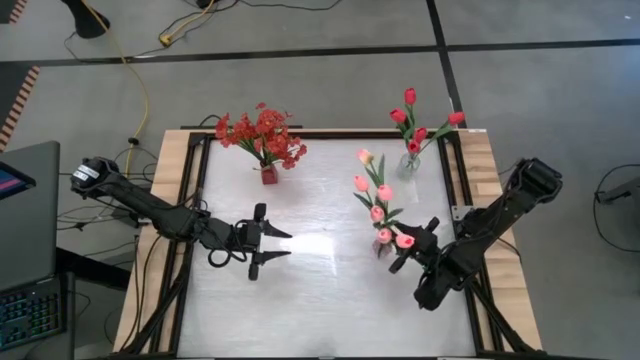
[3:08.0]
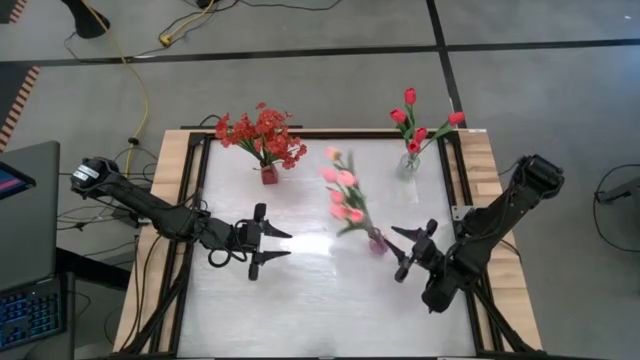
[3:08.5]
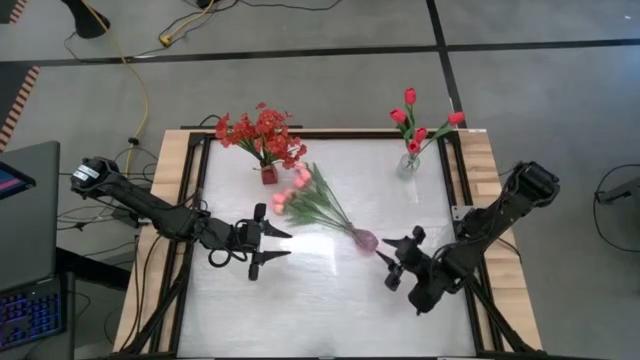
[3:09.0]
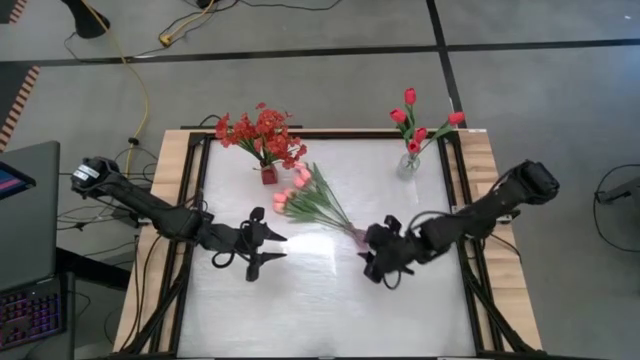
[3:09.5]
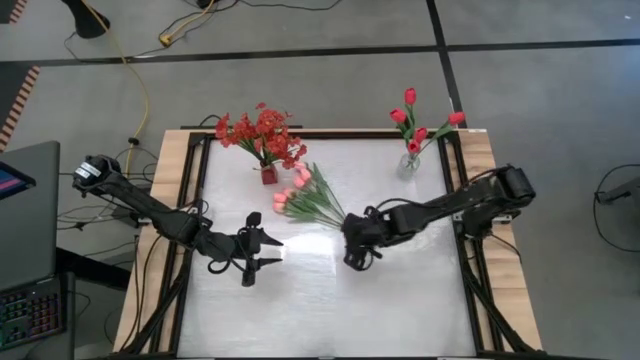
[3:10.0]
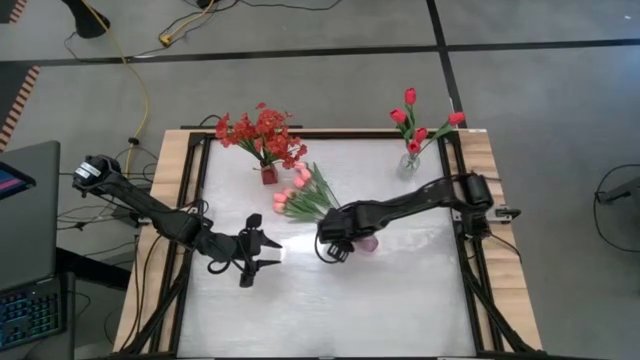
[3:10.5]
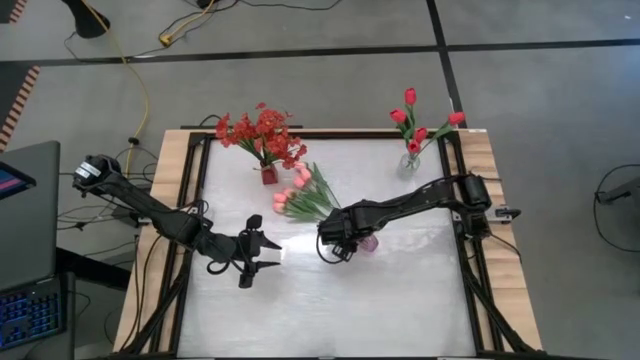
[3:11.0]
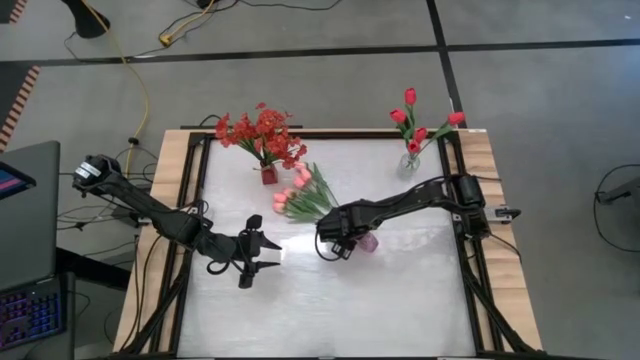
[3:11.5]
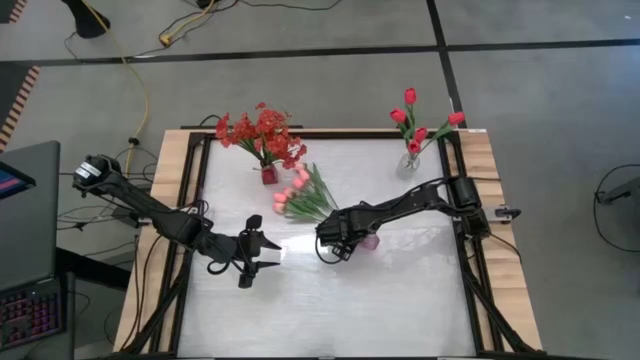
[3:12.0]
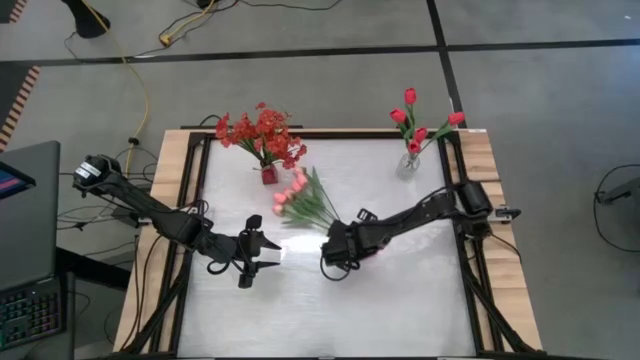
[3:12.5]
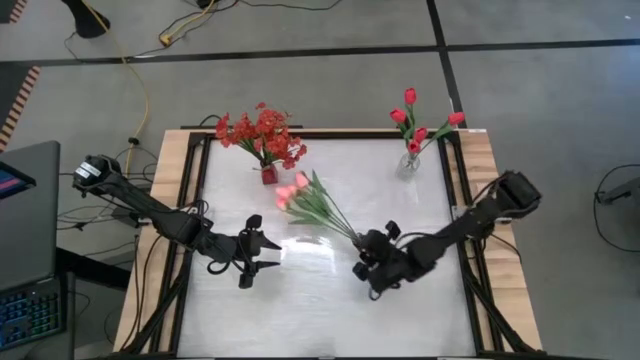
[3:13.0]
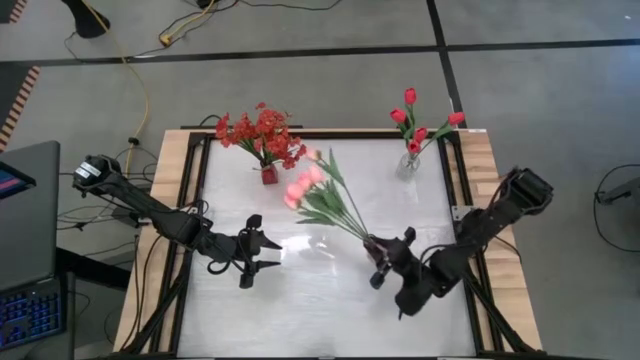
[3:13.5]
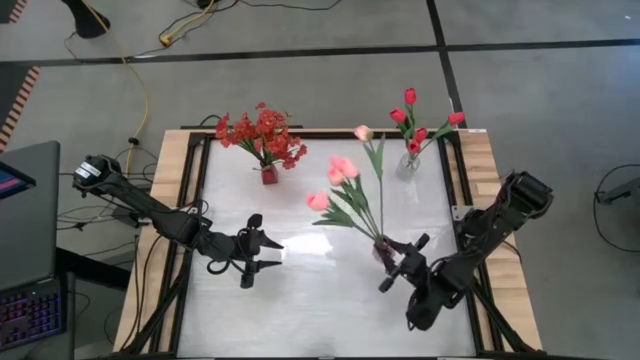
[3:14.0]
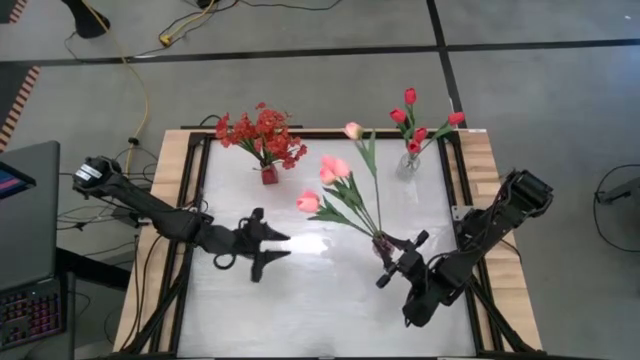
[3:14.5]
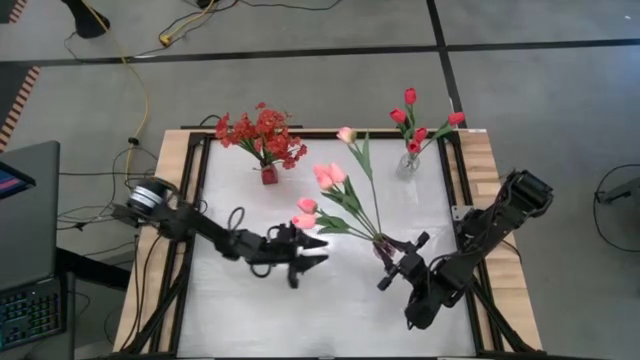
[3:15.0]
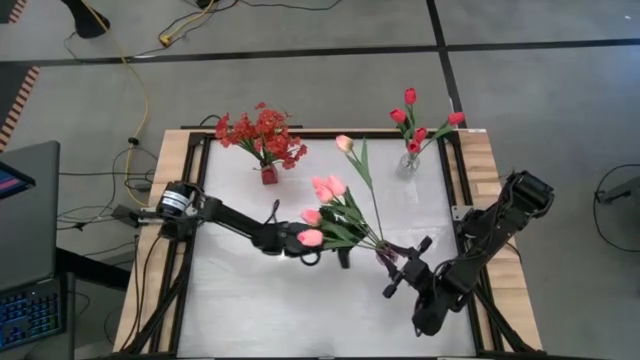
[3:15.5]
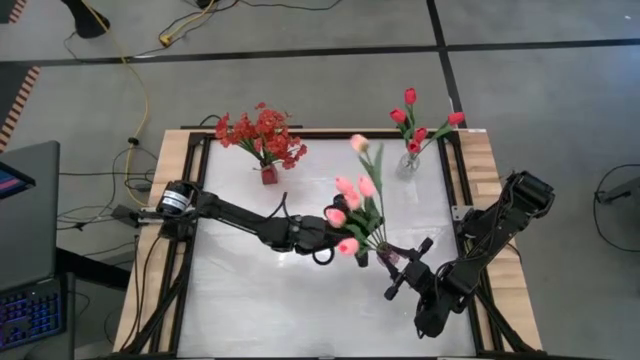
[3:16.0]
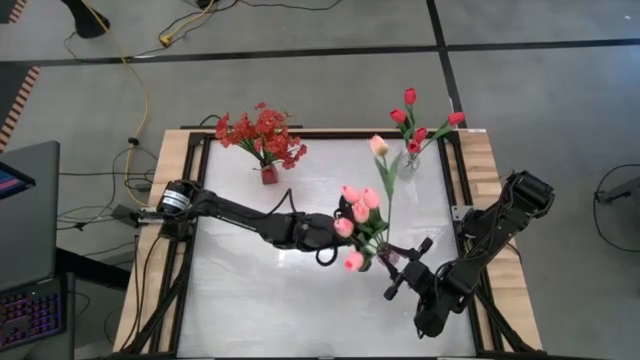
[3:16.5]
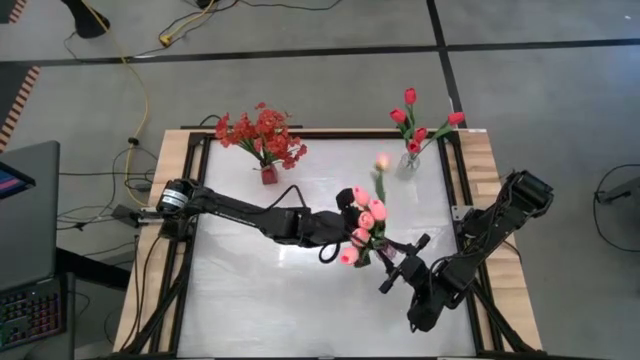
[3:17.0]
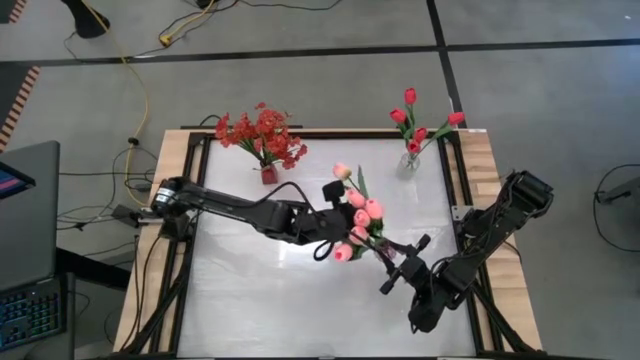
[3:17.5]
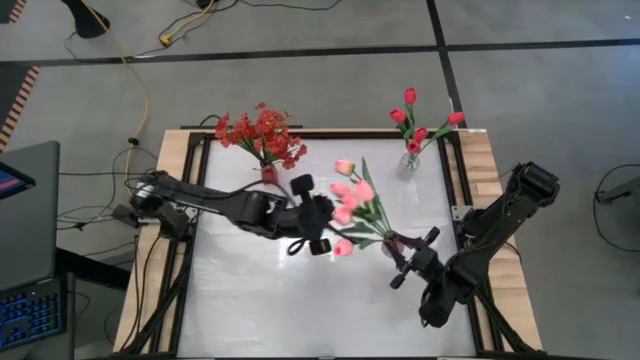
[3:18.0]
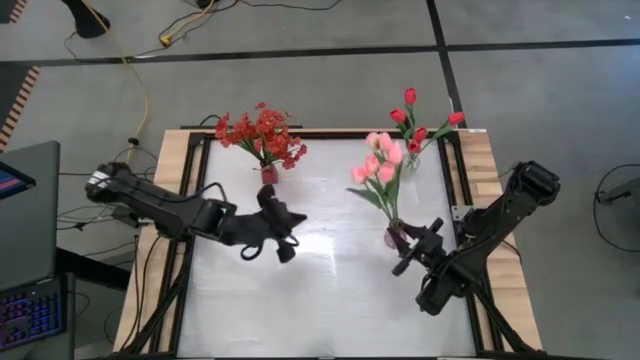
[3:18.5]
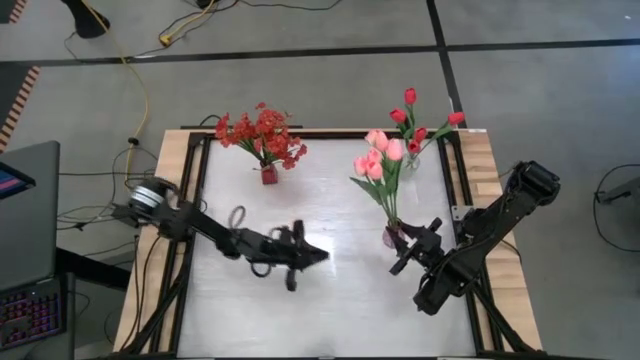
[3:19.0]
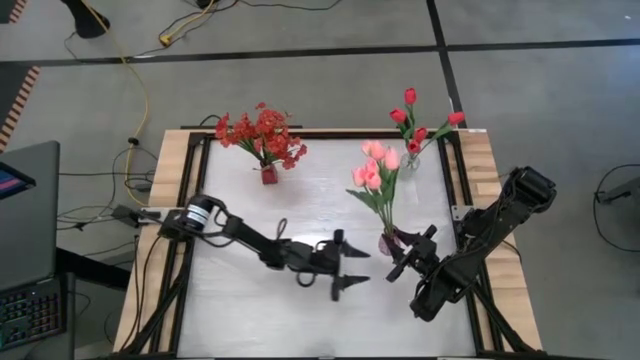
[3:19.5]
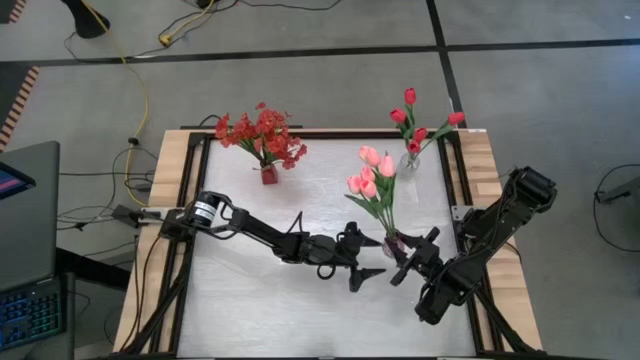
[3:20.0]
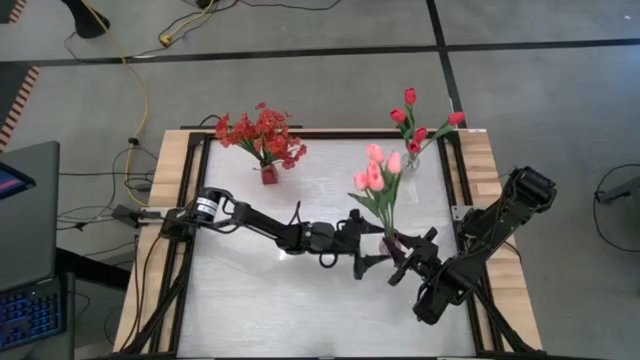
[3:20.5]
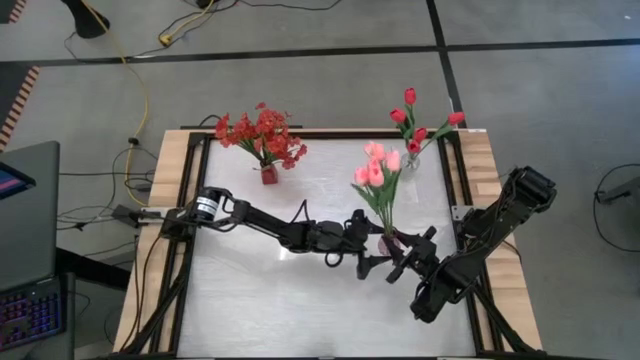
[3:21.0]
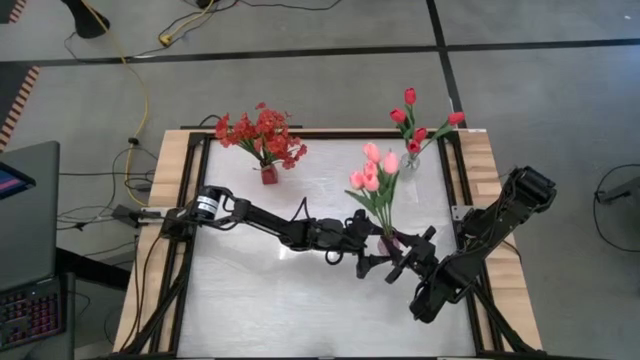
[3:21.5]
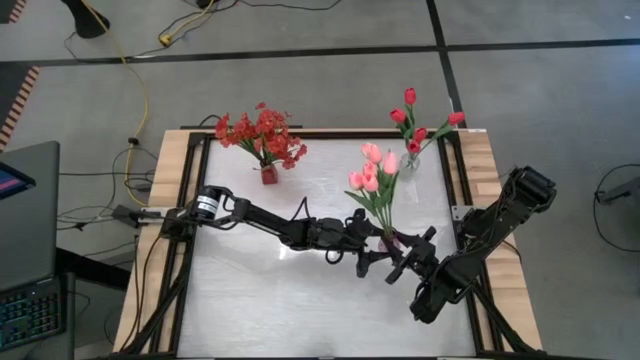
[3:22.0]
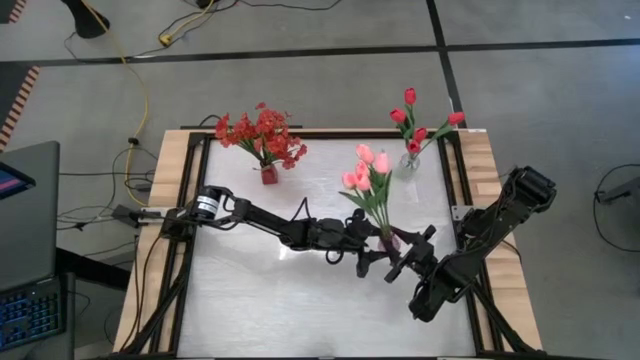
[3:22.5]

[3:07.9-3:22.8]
Task: Sort flowers into vase by color
Adjust the pink tulips in the purple flower vase

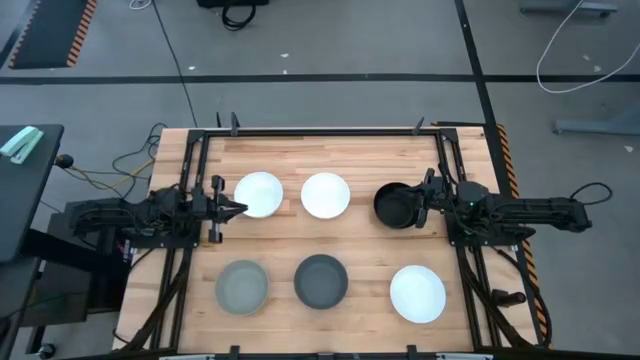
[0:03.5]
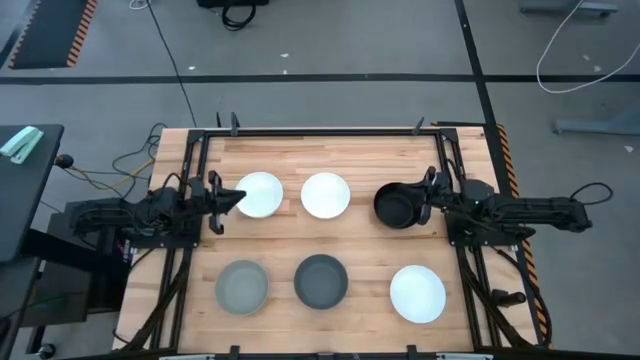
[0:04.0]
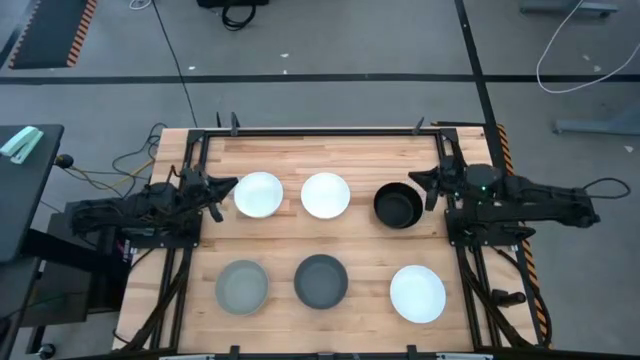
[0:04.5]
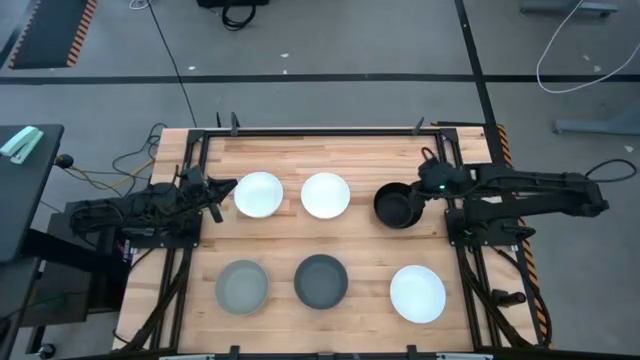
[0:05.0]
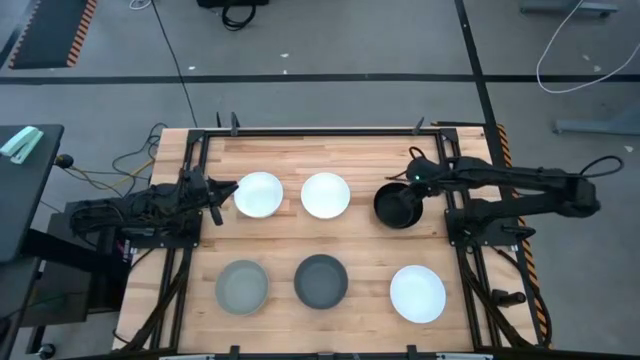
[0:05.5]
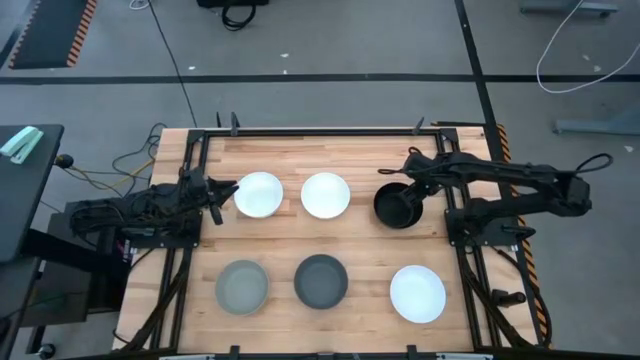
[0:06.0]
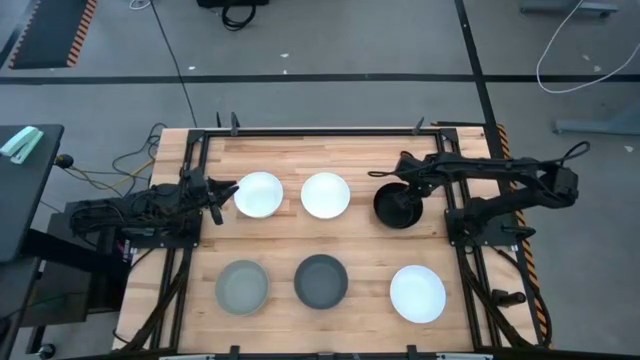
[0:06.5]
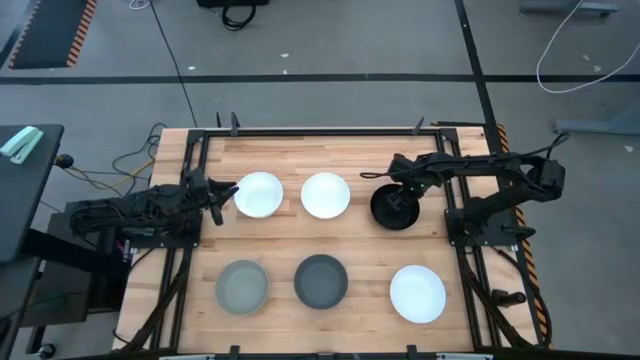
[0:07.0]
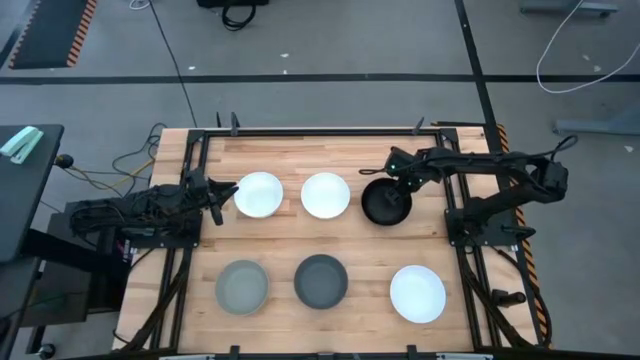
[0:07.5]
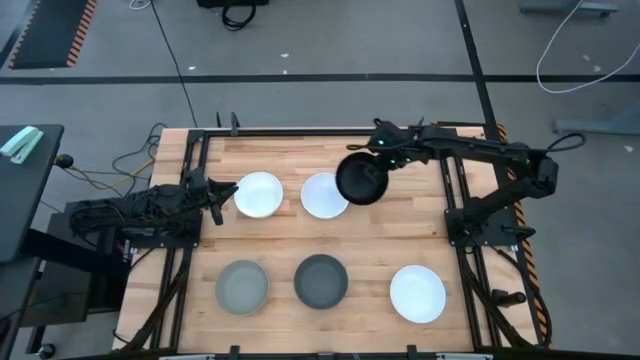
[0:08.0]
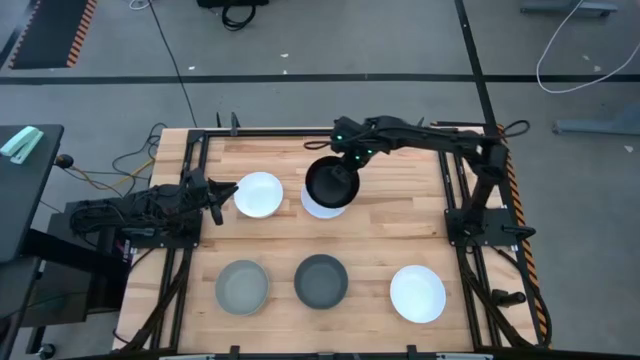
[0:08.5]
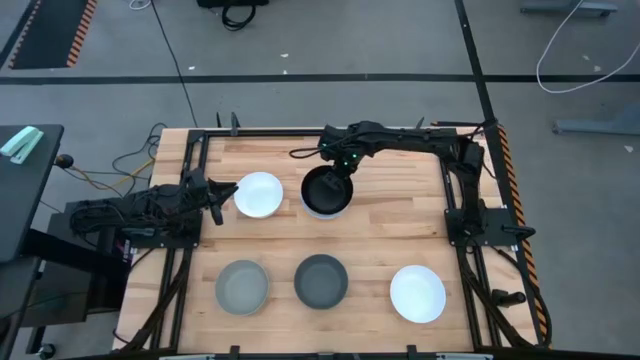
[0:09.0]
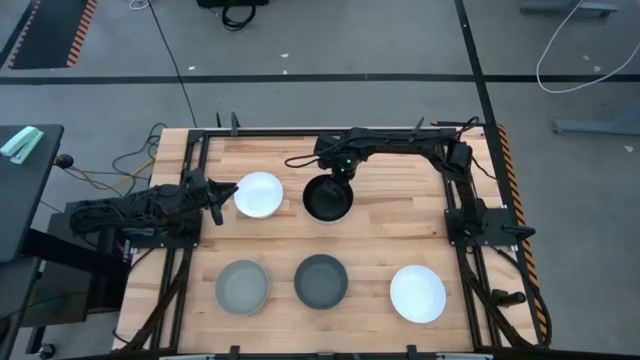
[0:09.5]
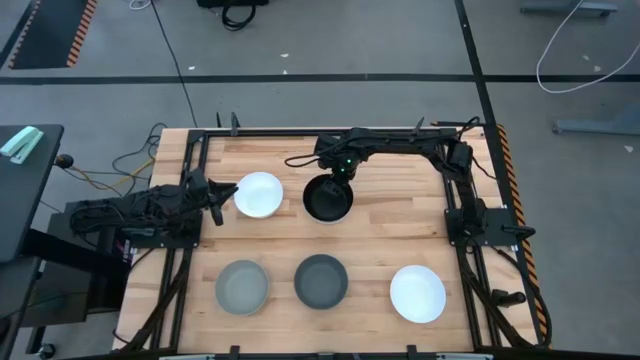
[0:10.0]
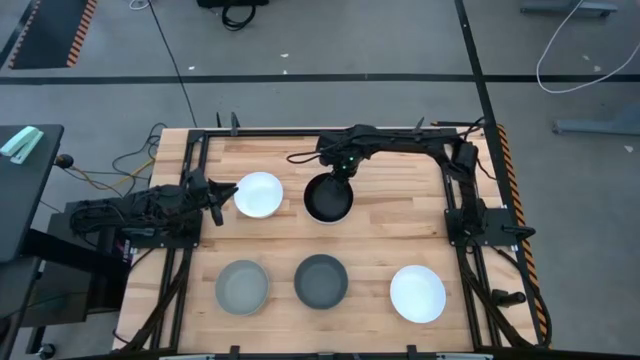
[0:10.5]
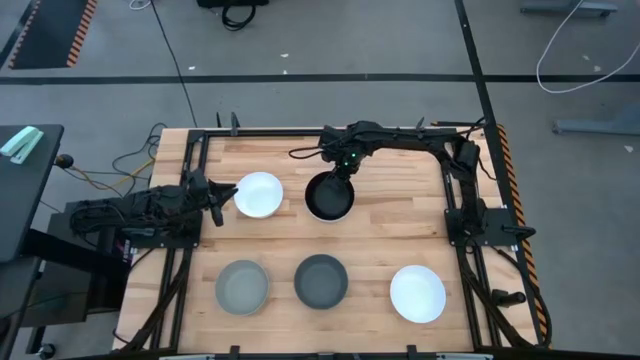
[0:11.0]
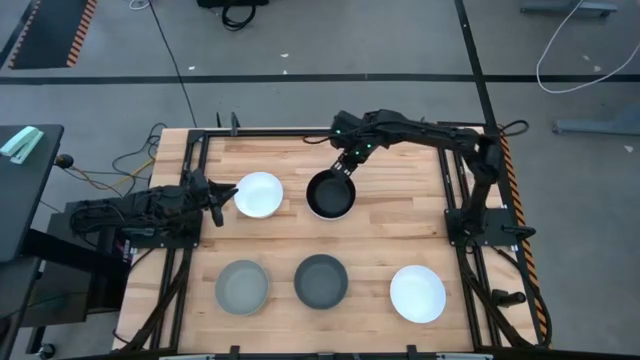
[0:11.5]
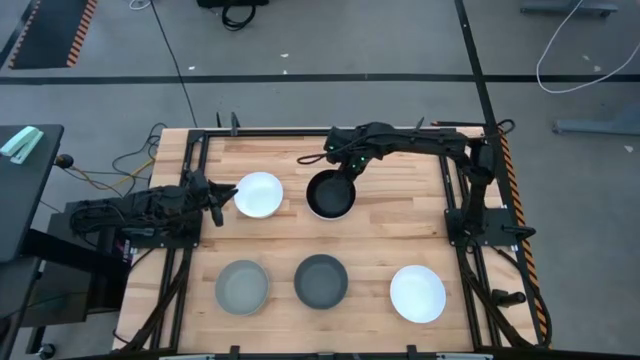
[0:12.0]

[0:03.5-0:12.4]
Task: Nest bowls inside each other
Stack the black bowl on the top middle white bowl
